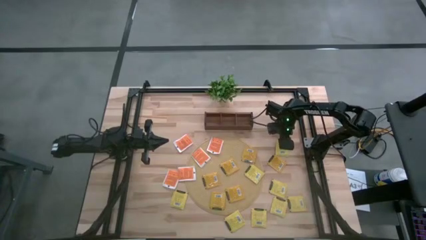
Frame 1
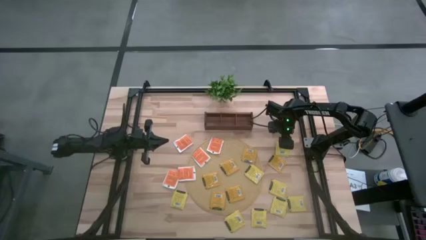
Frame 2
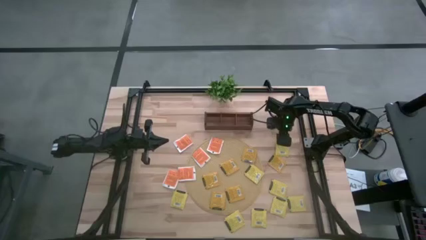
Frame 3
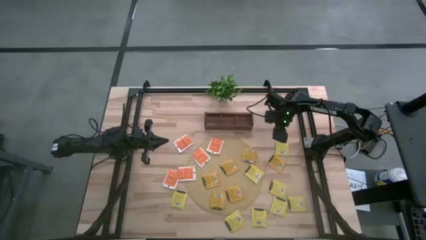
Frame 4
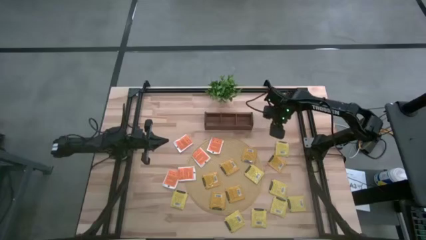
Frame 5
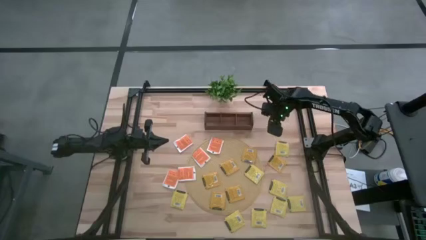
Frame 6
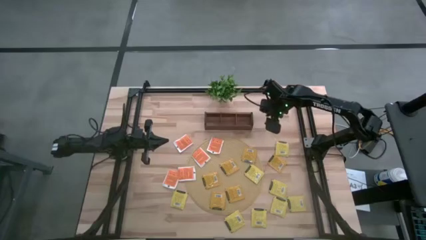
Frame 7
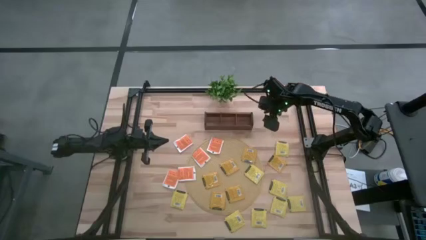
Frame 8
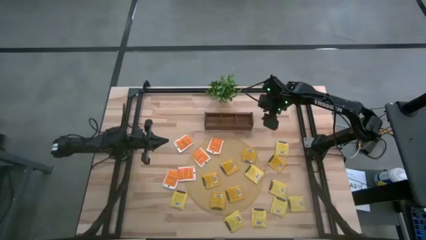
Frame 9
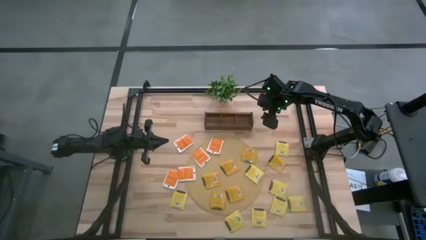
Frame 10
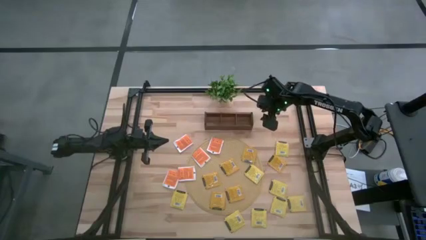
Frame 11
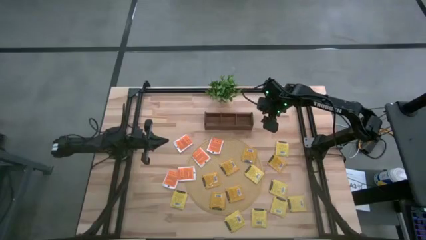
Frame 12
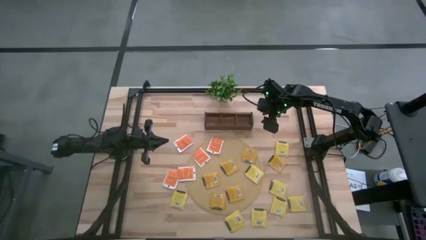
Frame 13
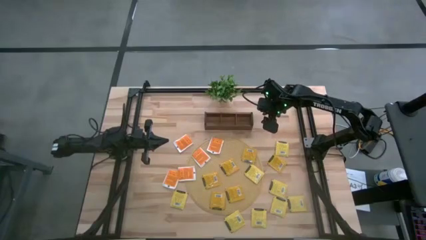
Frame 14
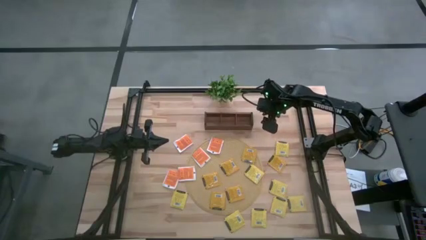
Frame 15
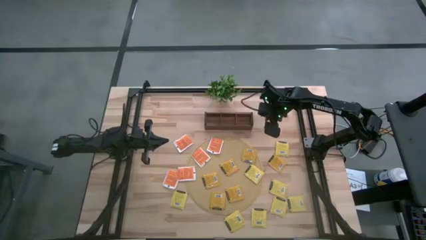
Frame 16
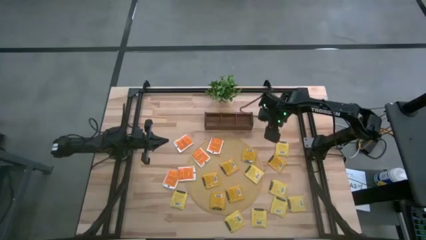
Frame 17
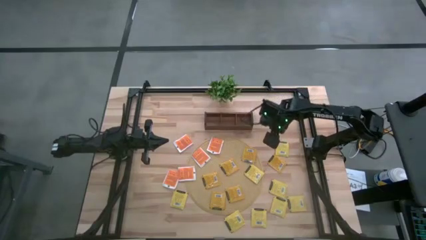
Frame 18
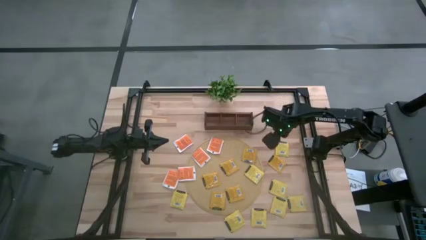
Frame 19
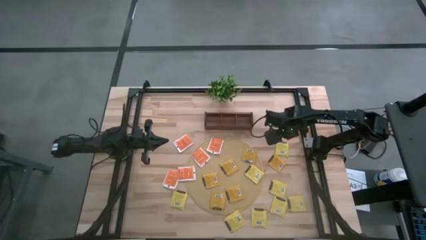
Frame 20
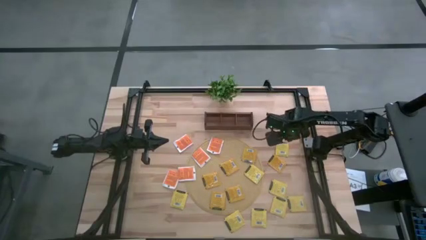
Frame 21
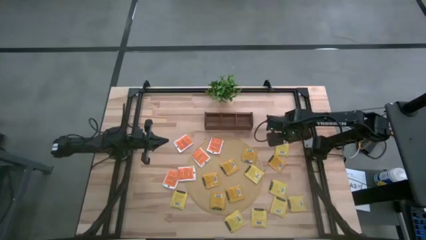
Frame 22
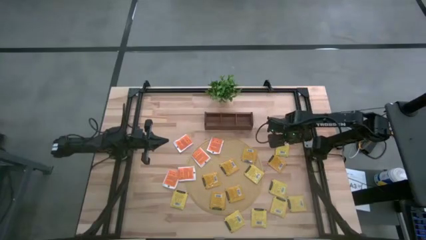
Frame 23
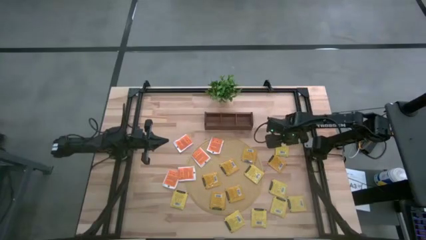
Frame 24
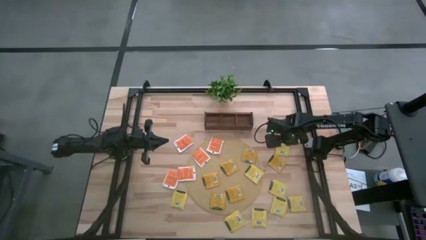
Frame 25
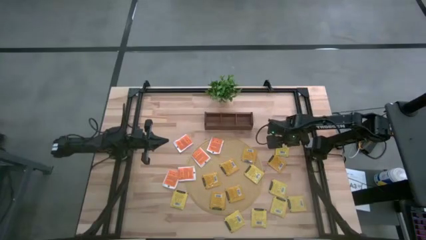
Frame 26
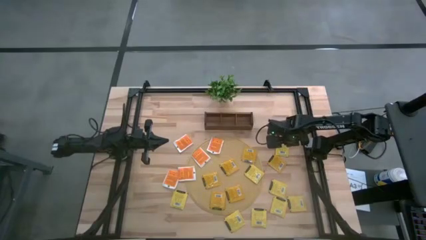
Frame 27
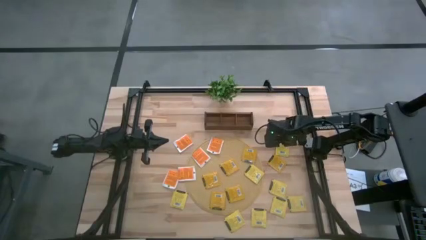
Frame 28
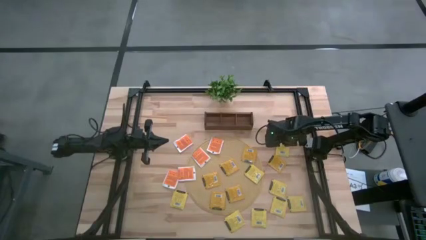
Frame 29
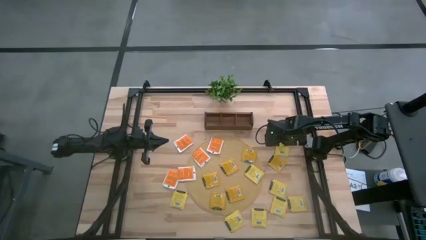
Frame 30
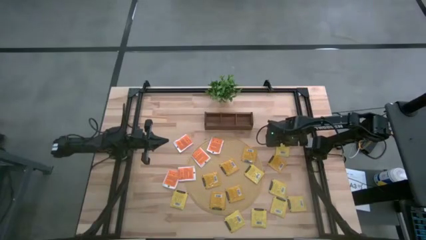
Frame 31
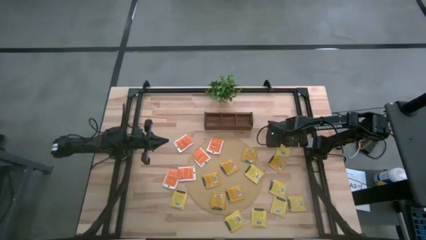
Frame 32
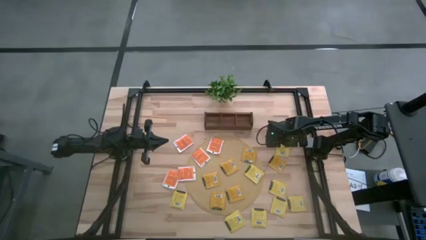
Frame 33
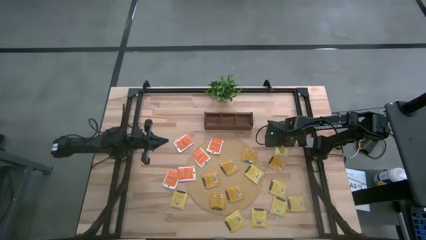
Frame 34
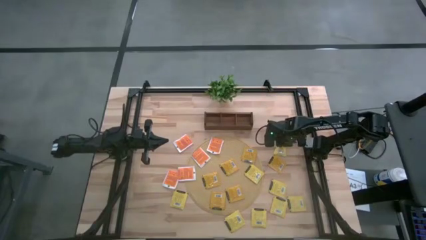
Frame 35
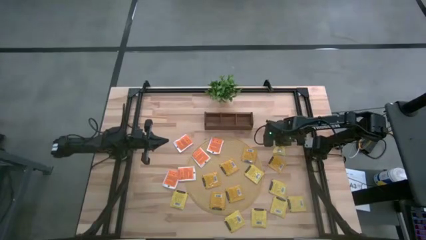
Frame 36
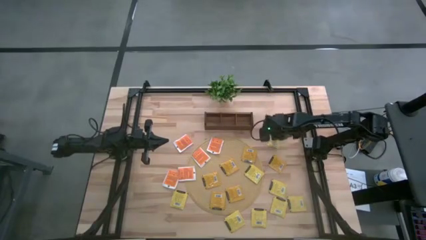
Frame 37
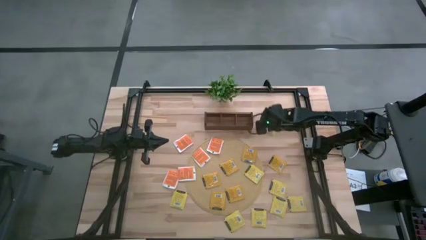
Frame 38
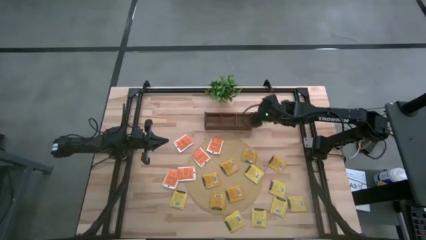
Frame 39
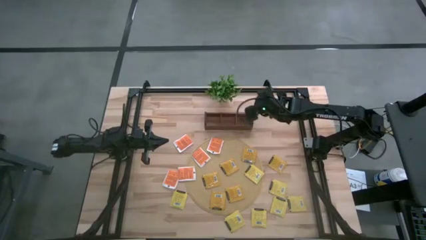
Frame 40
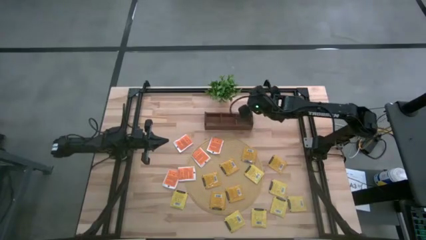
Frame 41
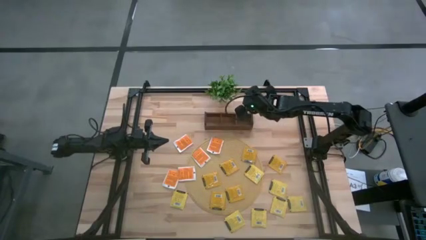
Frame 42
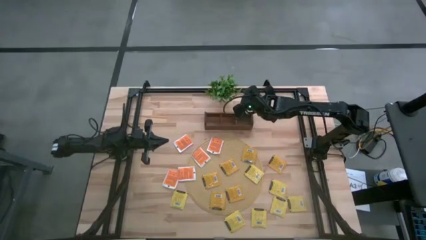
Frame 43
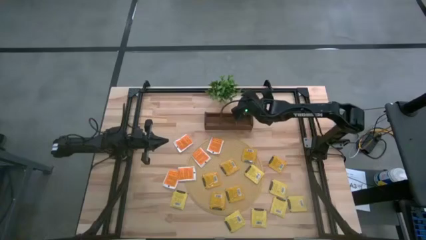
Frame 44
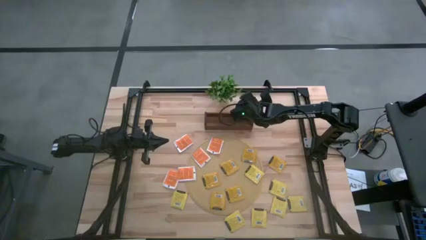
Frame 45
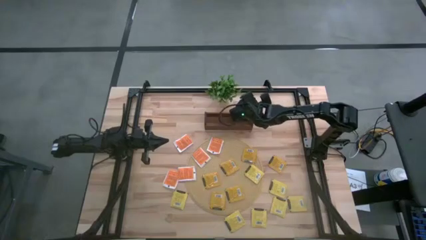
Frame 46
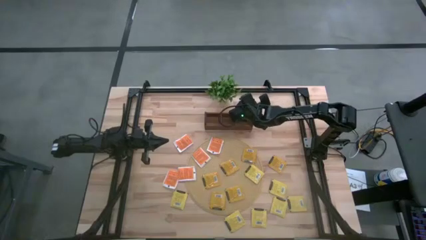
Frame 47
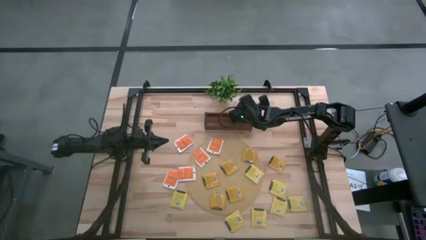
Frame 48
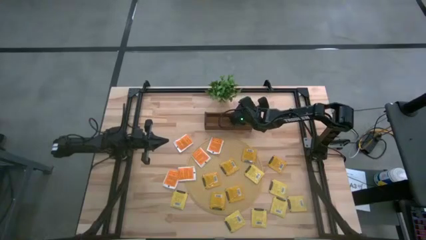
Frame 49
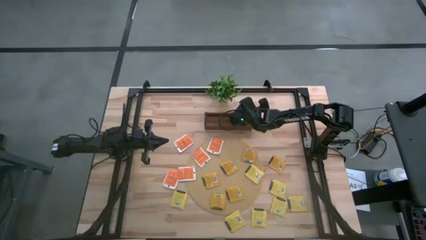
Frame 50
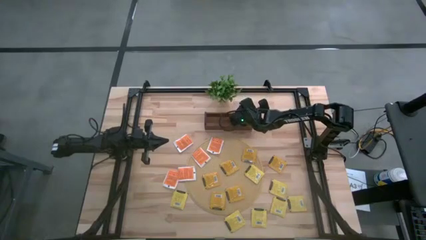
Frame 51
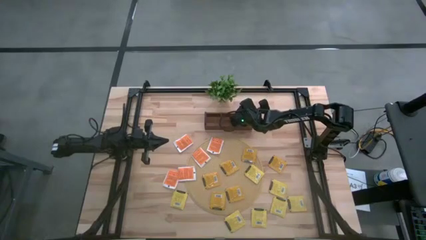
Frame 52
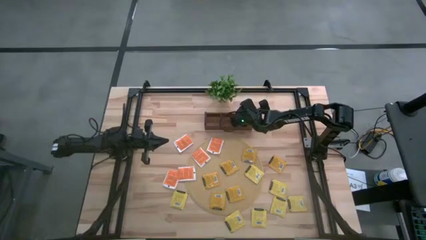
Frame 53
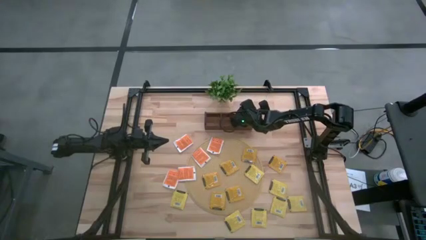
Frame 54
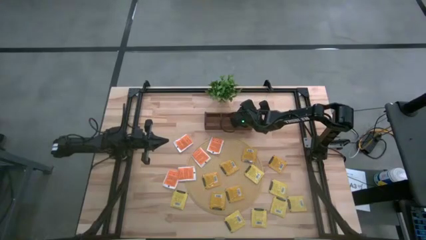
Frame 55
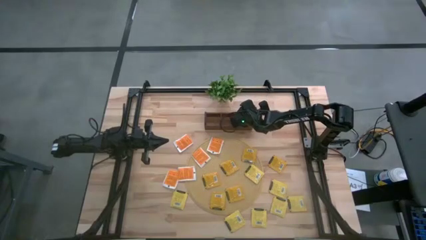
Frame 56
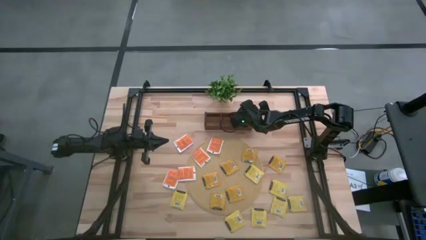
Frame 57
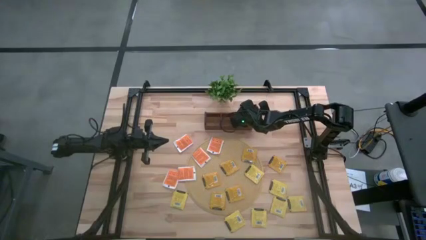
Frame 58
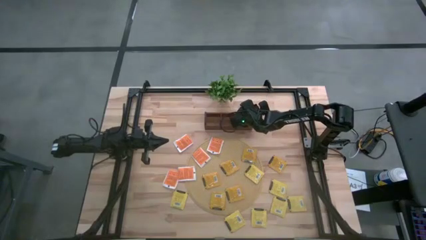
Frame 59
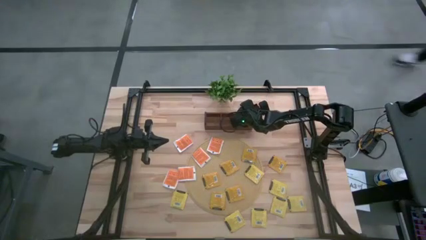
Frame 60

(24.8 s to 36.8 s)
Task: Pick & Place Tea
Put the yellow tea bag into the right section of the wooden organizer

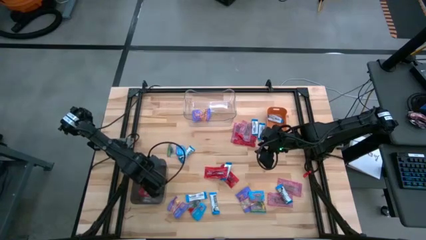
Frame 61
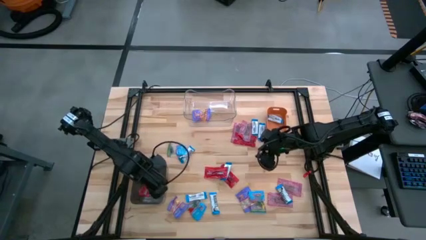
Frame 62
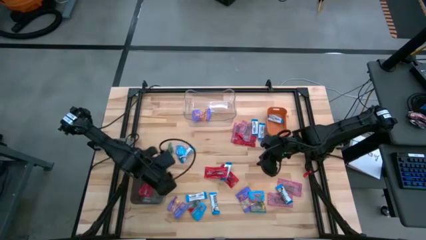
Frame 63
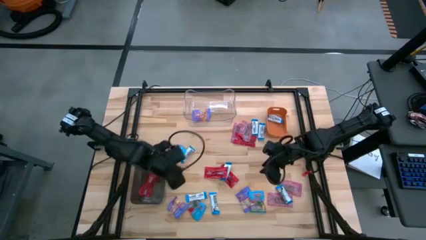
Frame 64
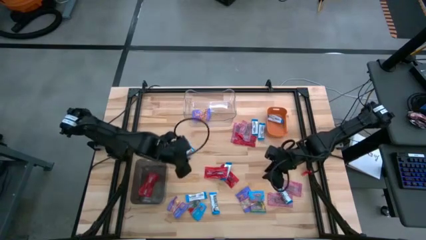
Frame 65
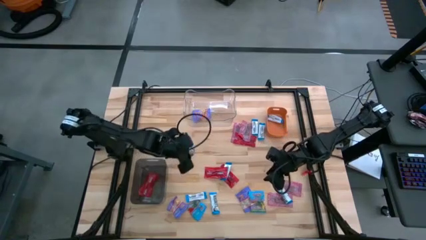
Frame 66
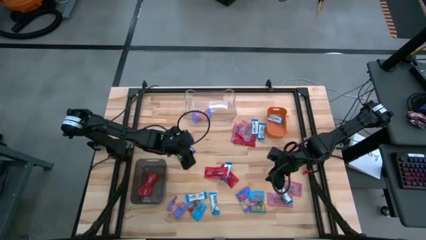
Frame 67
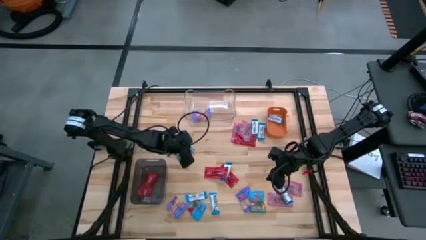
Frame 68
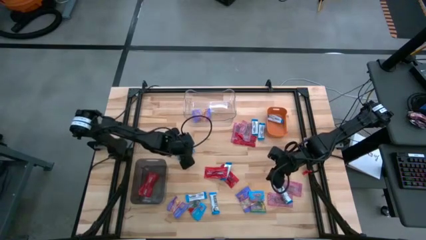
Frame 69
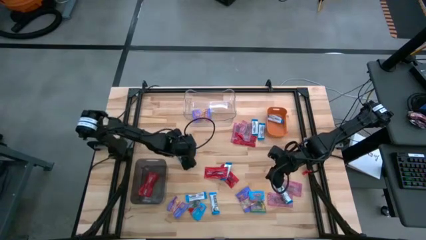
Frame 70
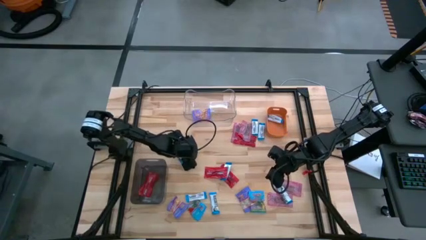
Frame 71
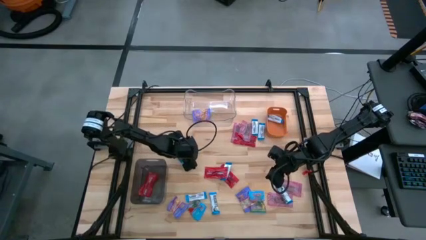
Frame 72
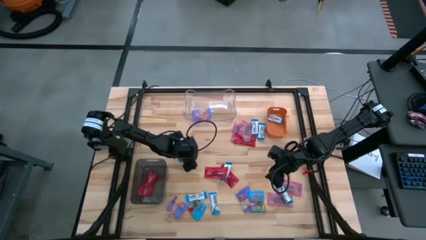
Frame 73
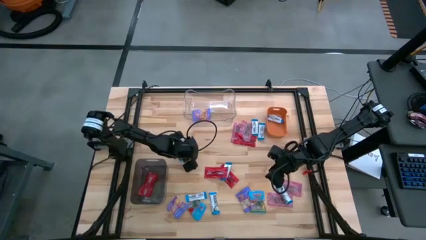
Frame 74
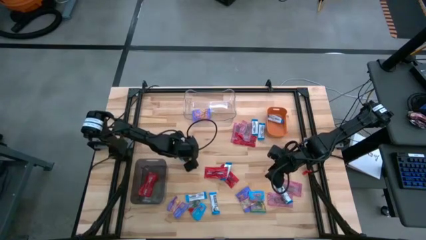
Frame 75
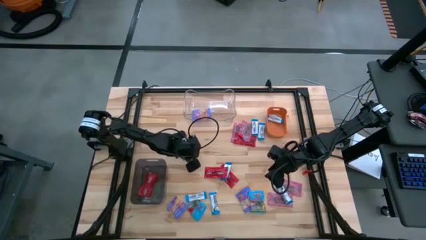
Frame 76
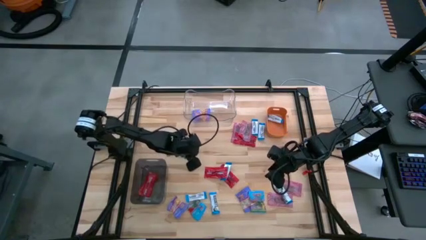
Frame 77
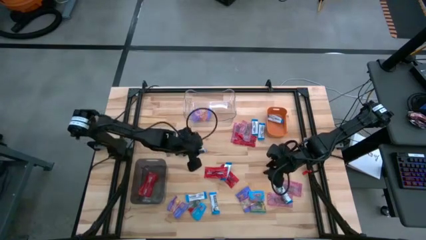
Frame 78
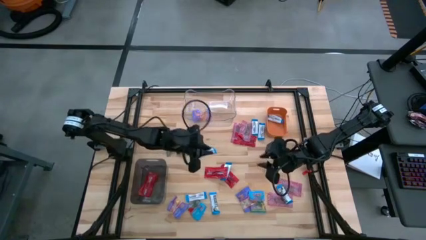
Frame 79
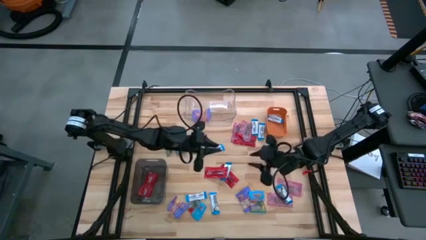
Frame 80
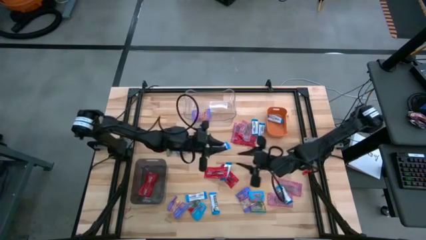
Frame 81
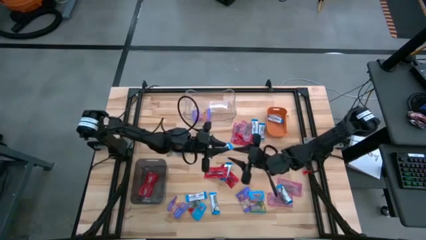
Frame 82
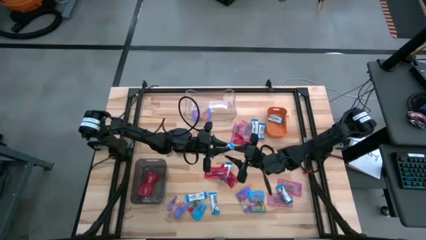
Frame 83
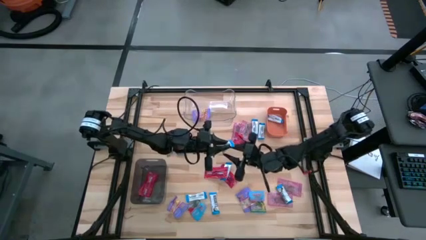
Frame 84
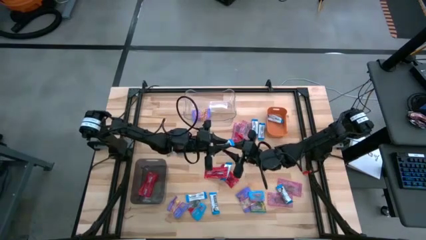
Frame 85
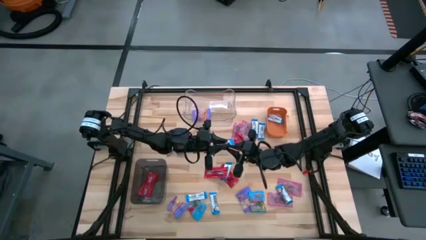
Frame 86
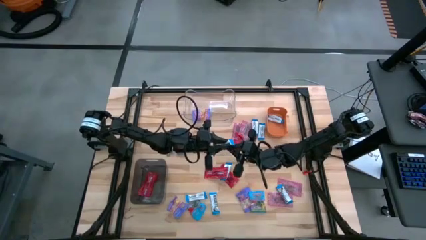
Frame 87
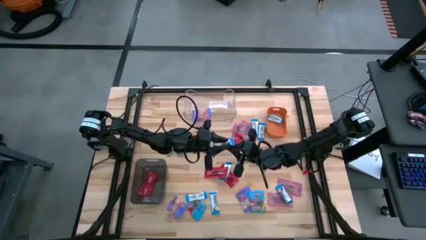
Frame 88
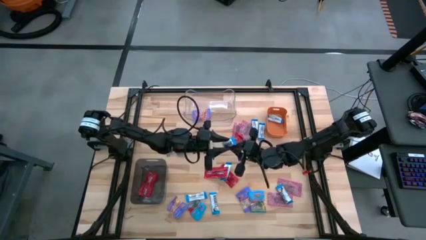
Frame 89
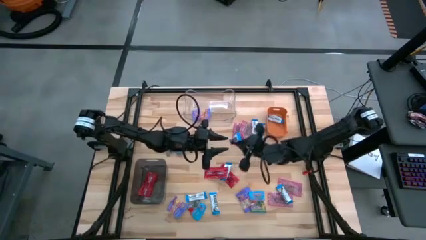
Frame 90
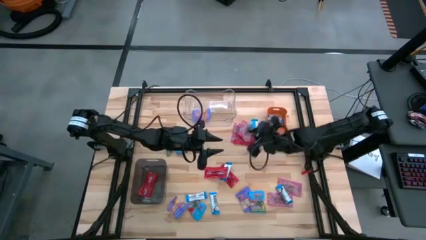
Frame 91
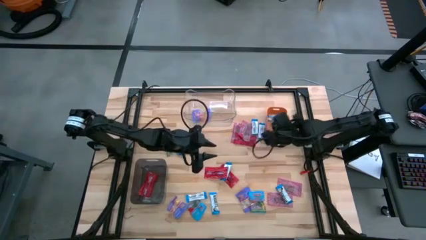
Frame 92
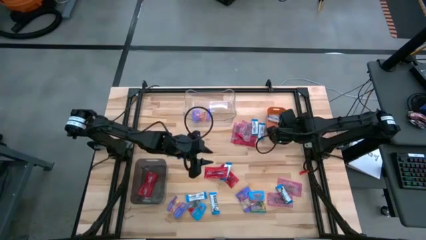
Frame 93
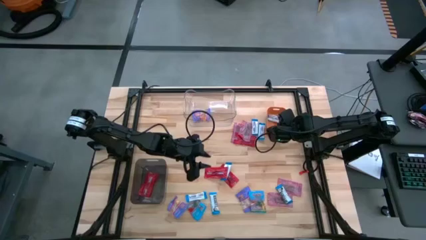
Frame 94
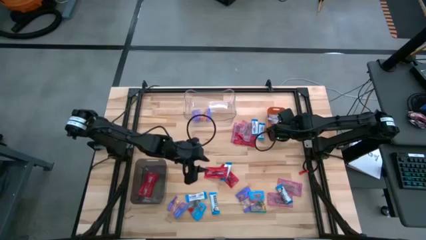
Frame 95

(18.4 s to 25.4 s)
Task: Sort candy
Put the white chocolate into the orange bin
